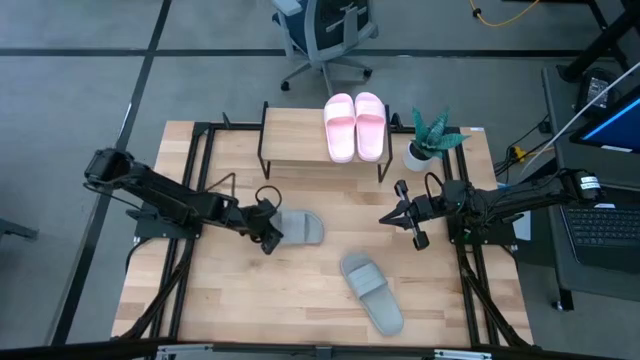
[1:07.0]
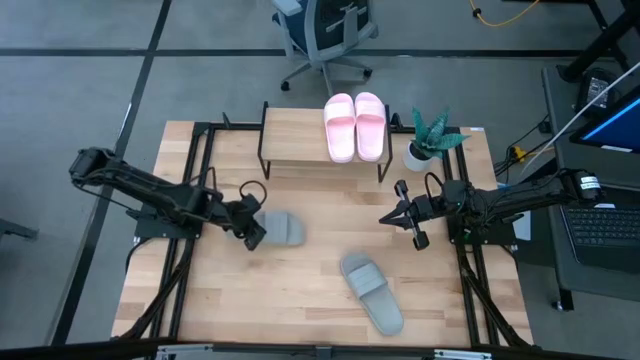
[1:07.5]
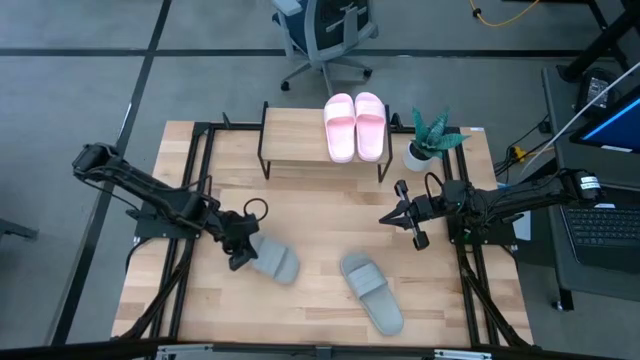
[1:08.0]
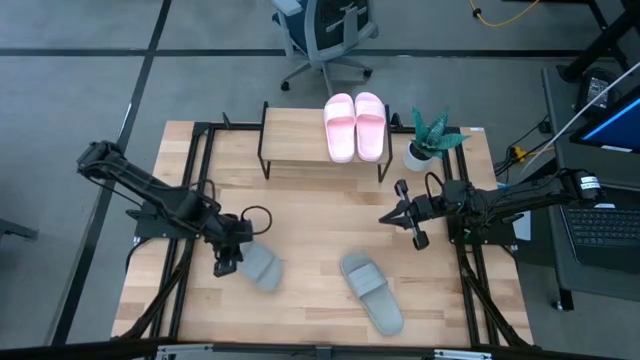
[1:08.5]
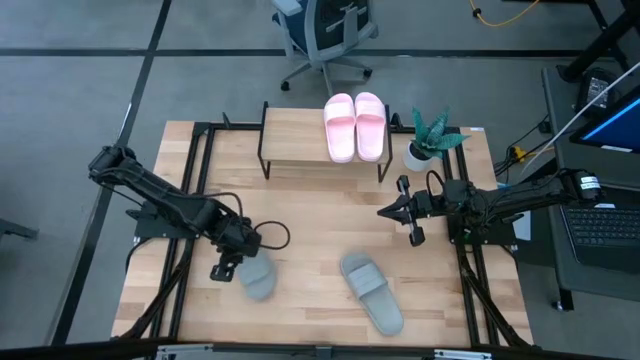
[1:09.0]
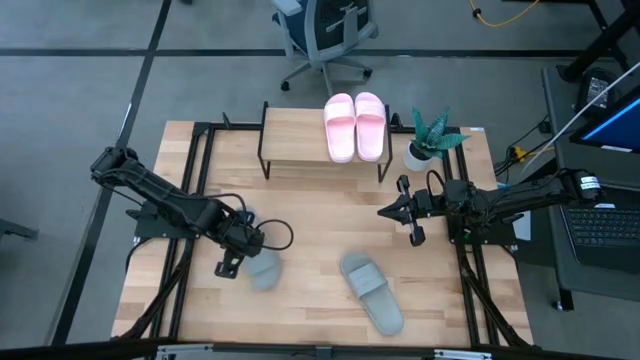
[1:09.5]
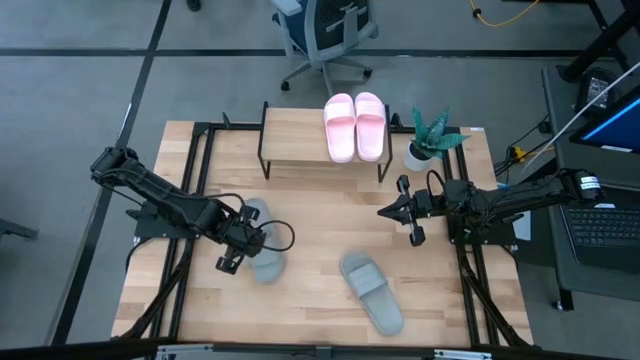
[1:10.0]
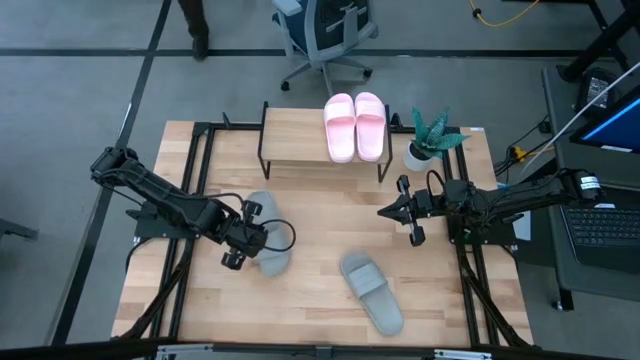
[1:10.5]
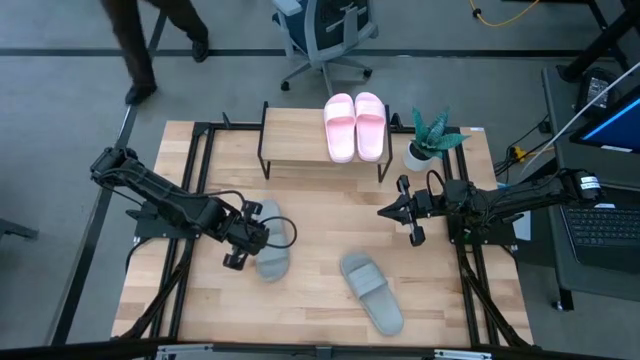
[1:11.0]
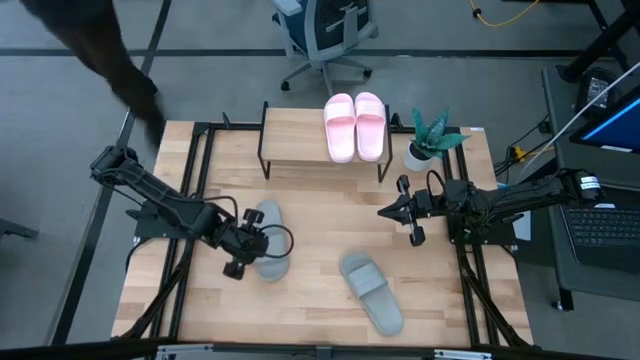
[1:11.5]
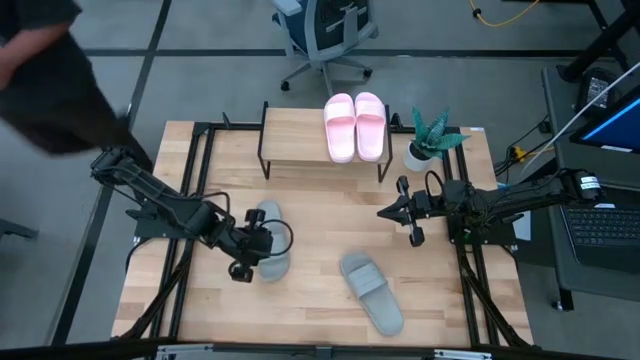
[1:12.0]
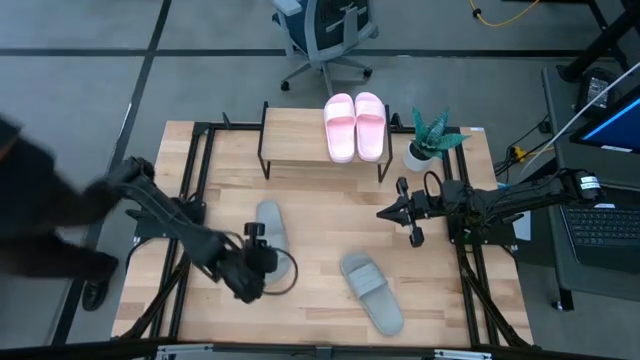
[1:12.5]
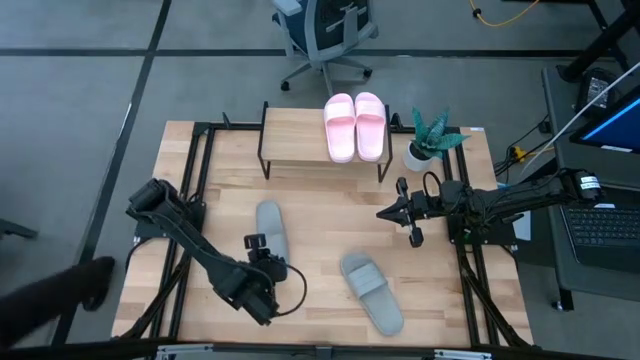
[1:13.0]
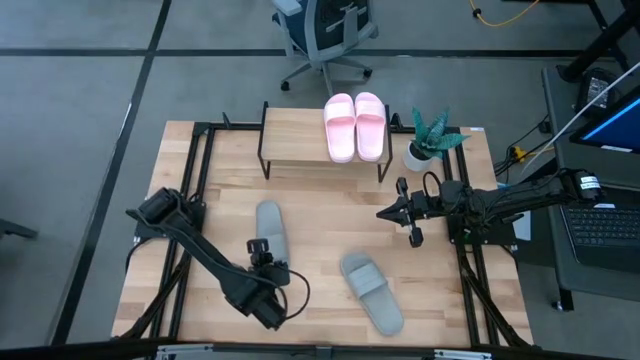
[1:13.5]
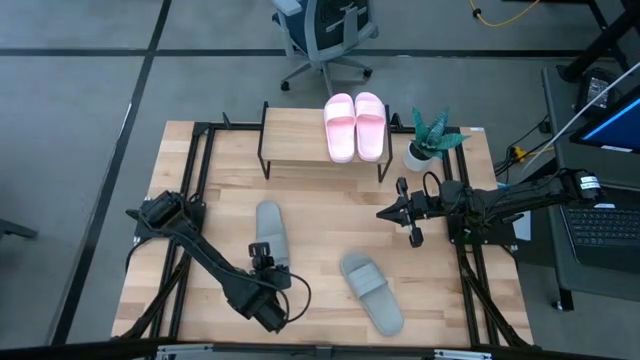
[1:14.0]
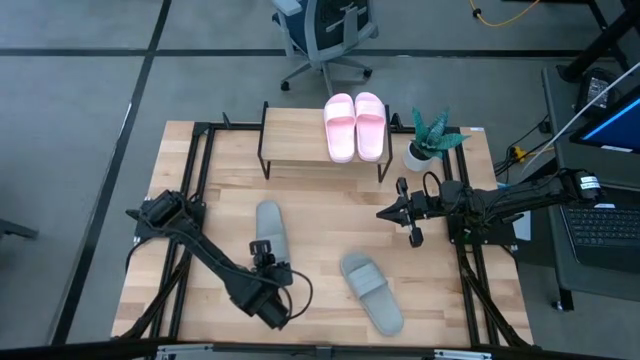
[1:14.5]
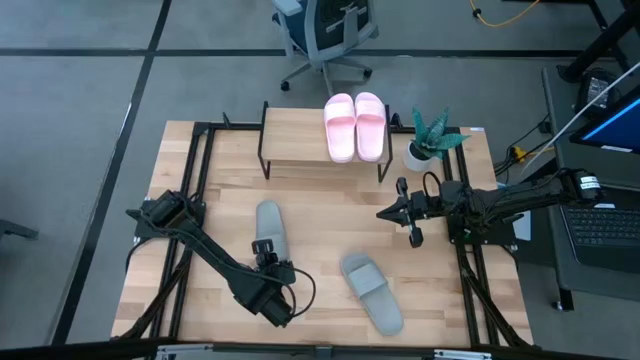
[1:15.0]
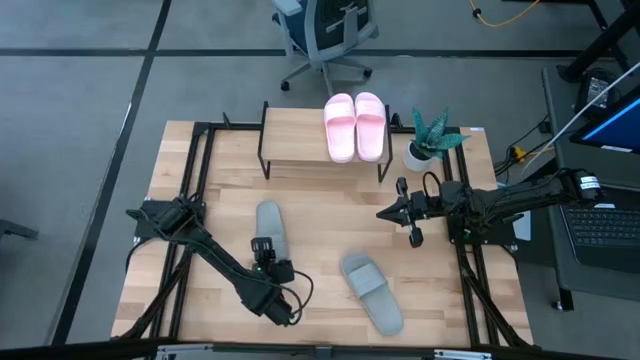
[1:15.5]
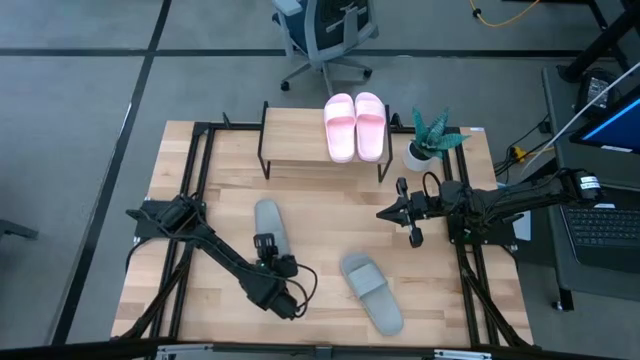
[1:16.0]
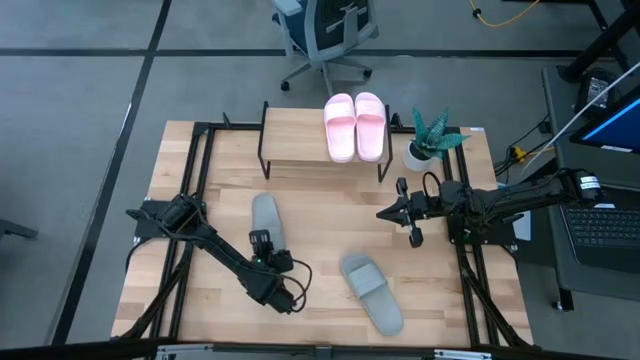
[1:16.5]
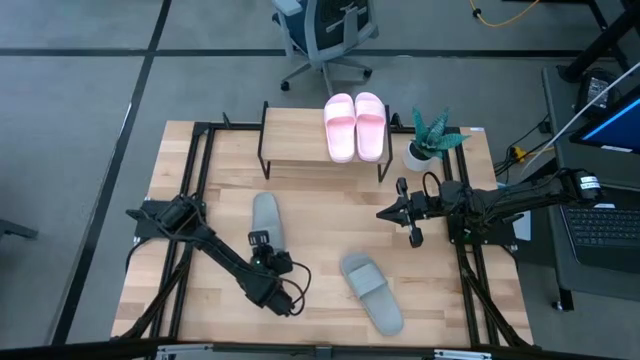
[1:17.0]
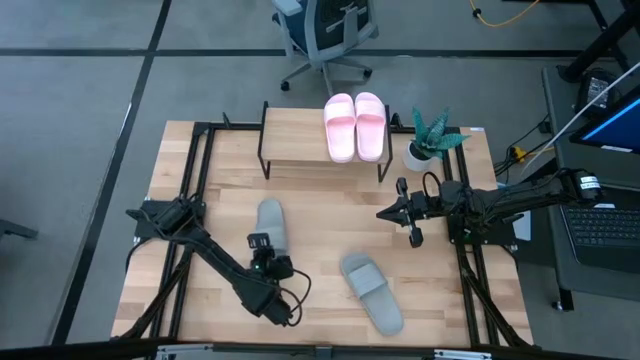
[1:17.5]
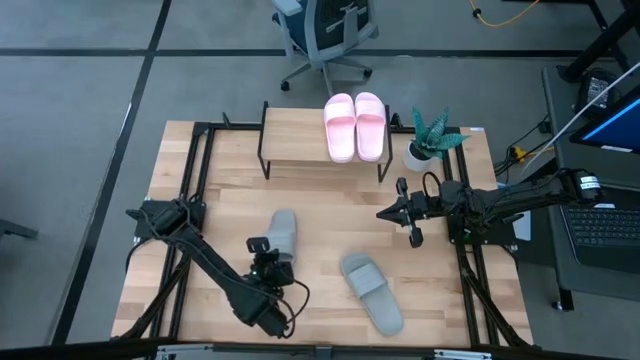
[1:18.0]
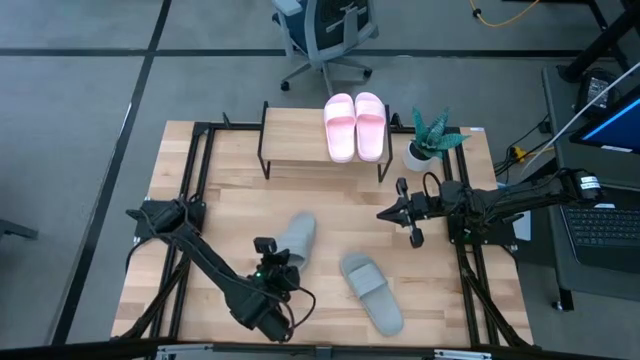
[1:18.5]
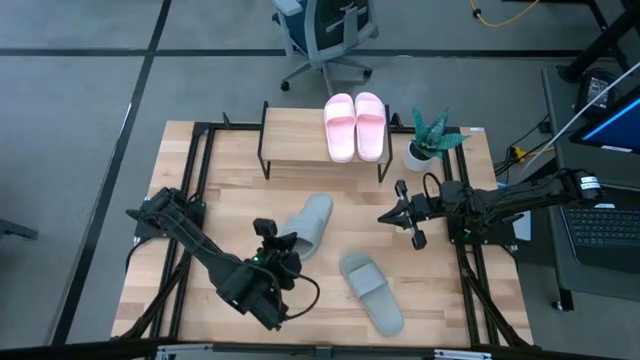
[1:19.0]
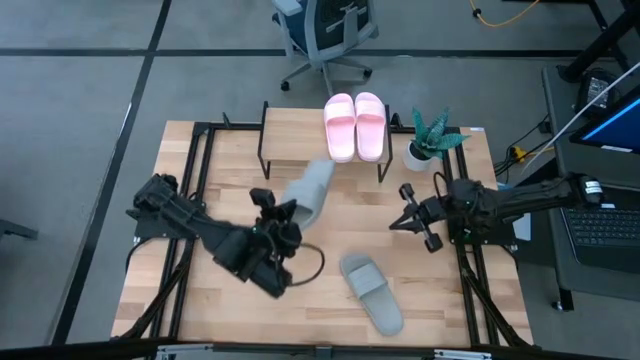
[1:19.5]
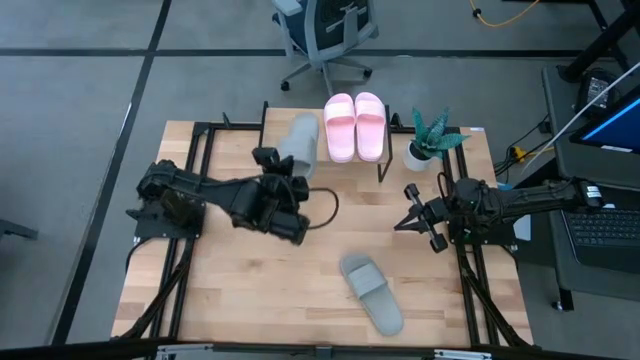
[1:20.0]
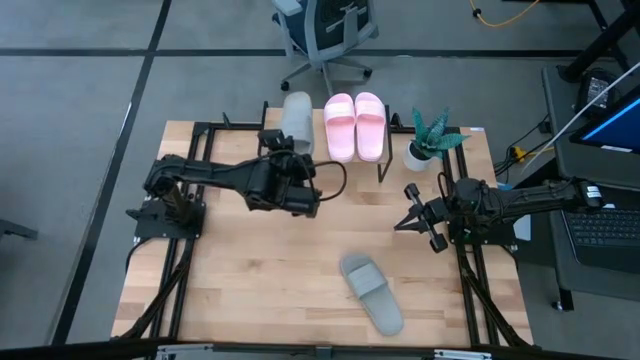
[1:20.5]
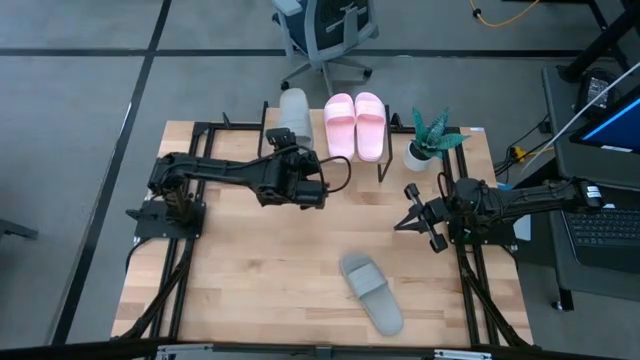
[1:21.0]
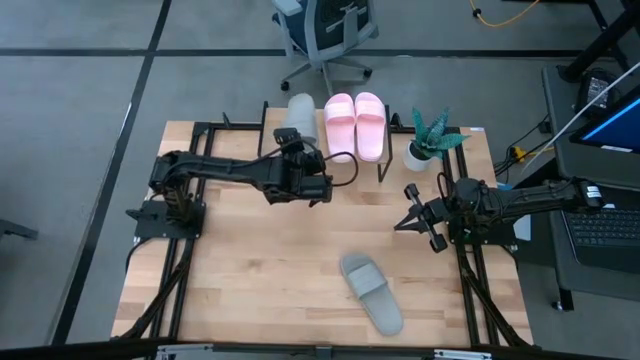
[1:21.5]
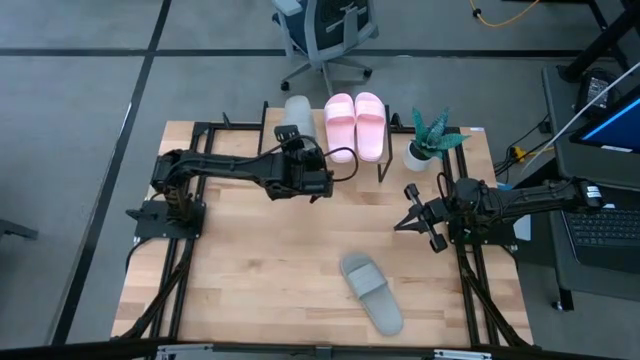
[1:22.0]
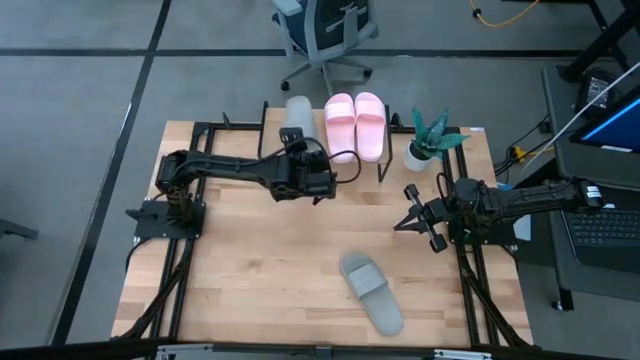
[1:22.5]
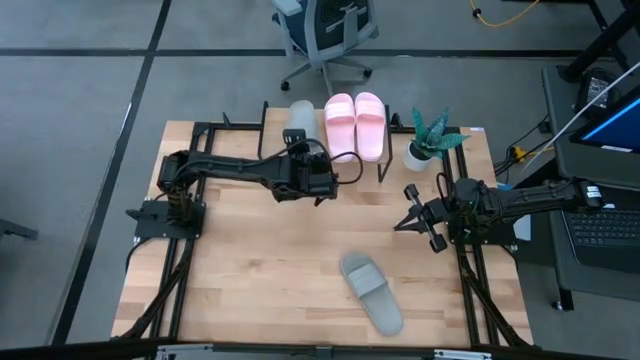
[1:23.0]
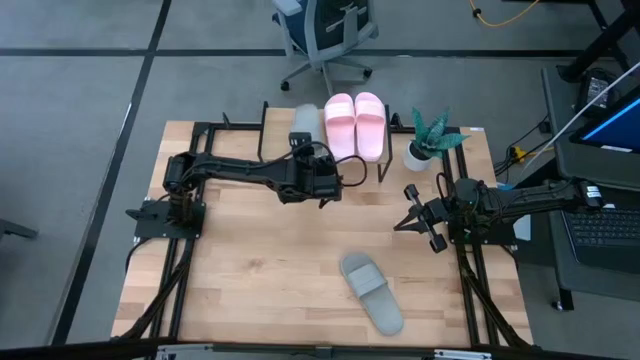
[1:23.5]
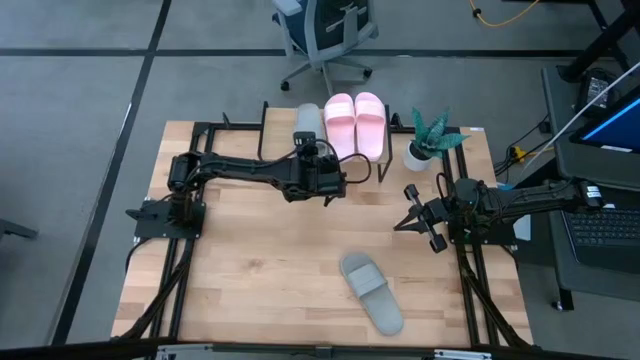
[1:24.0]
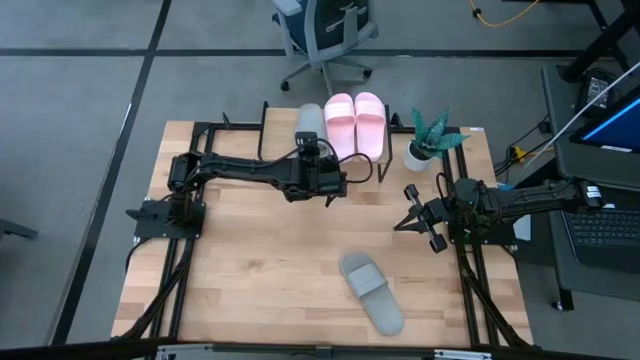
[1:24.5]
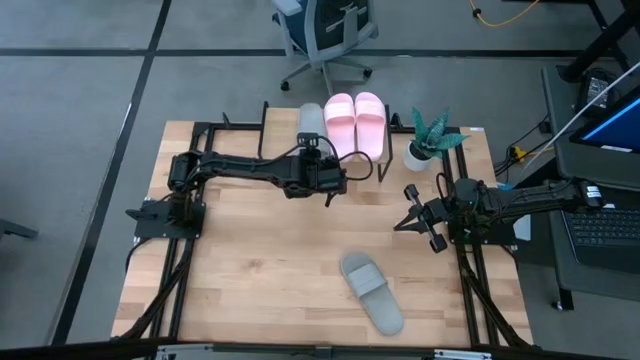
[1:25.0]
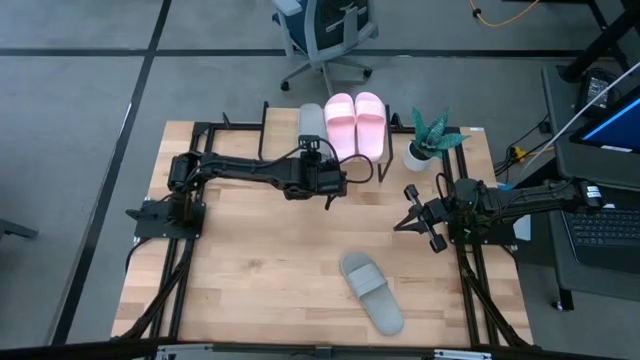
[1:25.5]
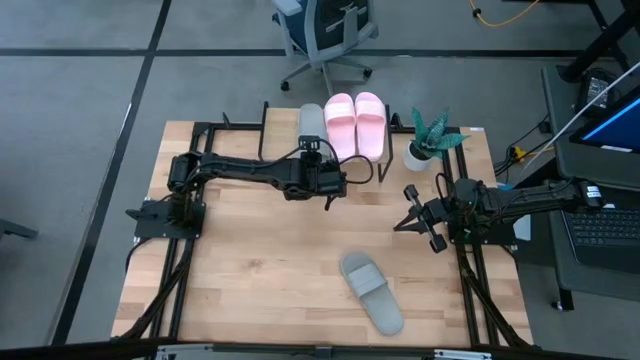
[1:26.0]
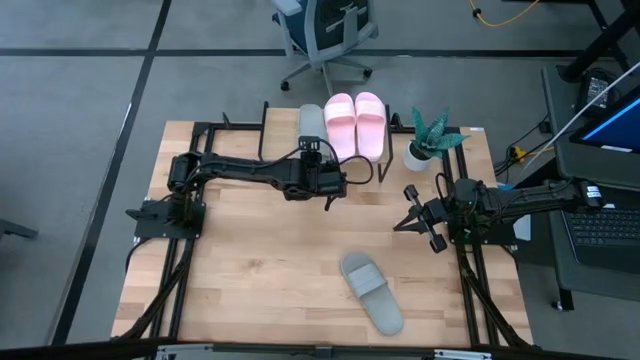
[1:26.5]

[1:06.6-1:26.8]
Task: Pick and place slides into the shelf
Put the left gray slipper on the shelf

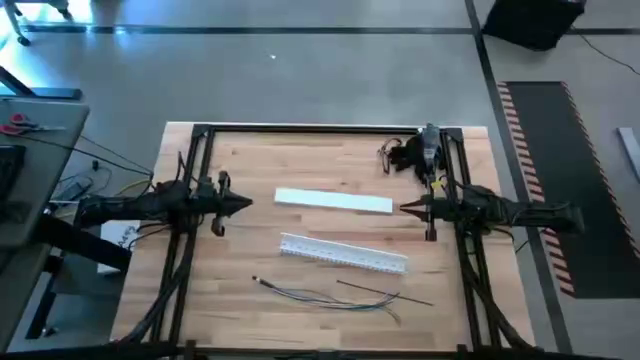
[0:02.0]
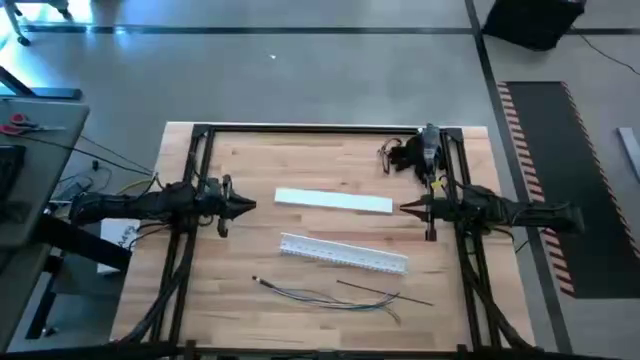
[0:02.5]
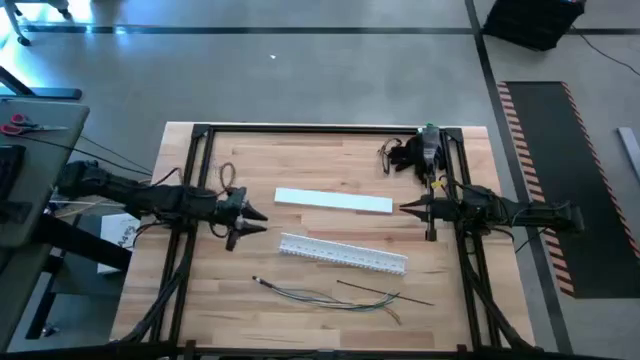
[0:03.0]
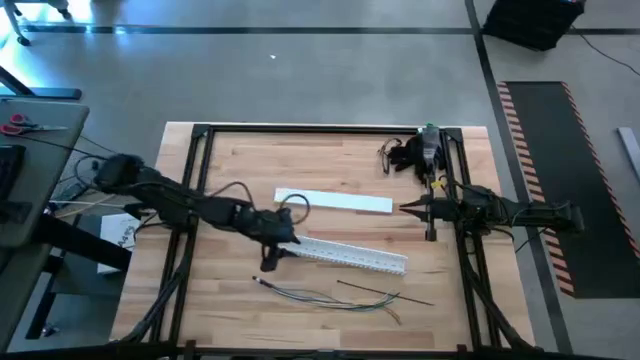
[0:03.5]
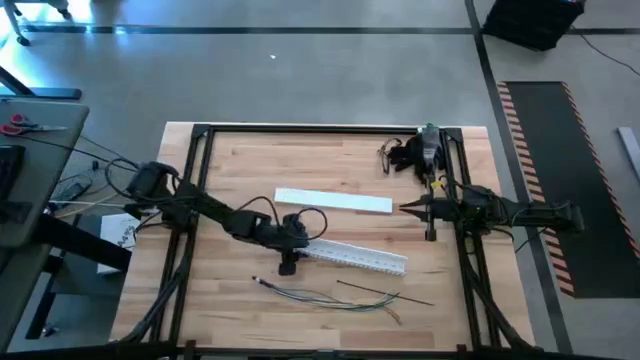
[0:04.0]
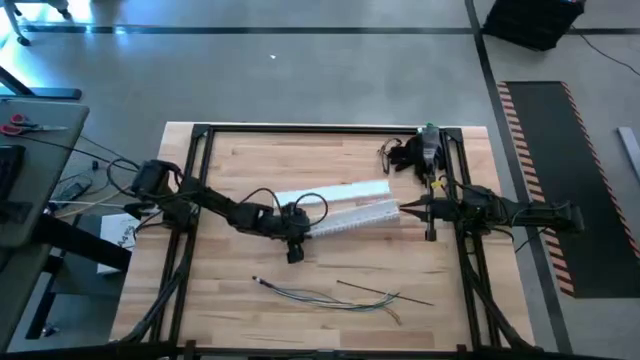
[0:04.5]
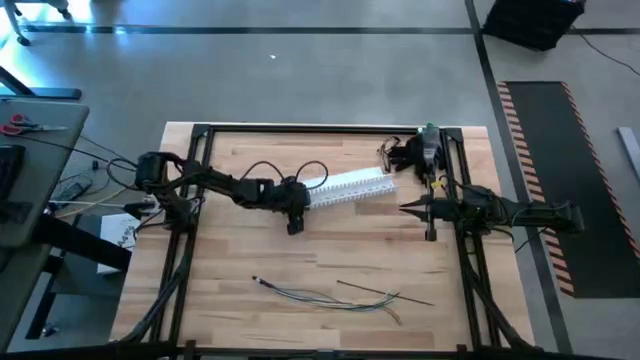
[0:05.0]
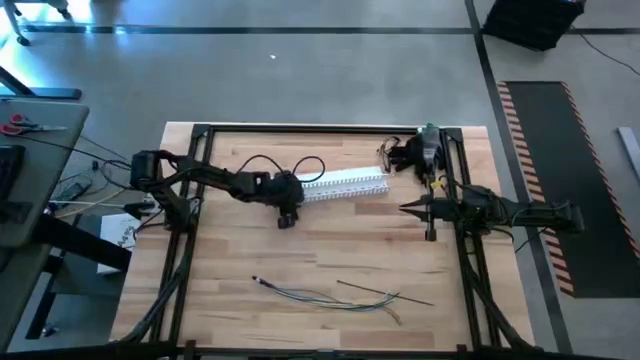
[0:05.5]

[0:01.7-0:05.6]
Task: Ziptie cables
Adjust the white cable duct
